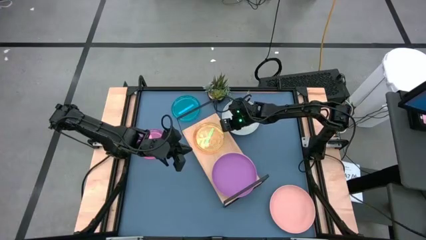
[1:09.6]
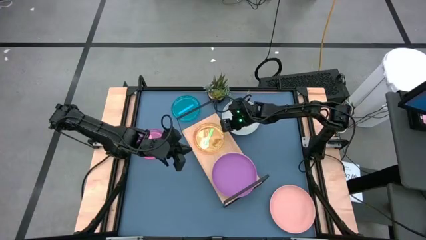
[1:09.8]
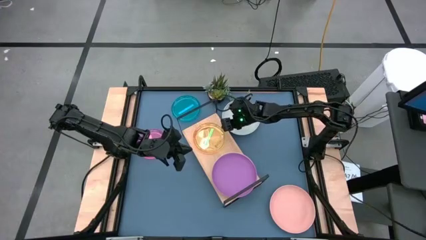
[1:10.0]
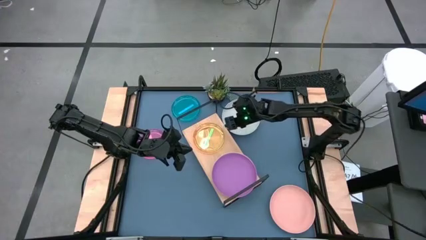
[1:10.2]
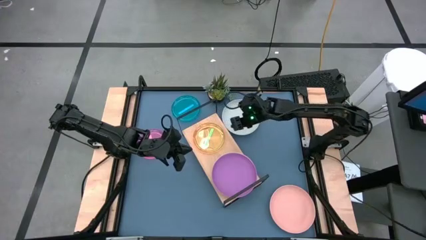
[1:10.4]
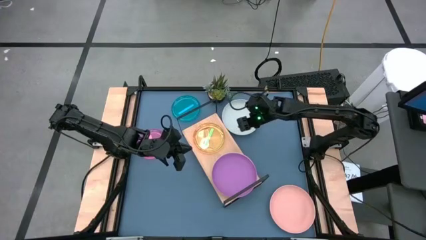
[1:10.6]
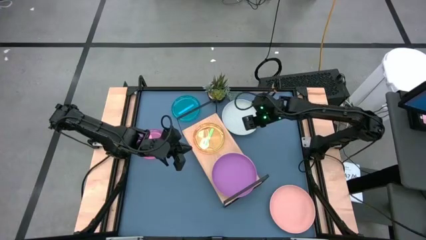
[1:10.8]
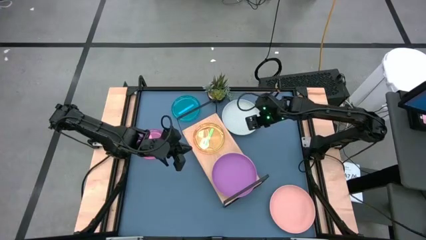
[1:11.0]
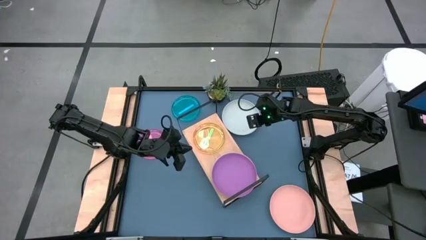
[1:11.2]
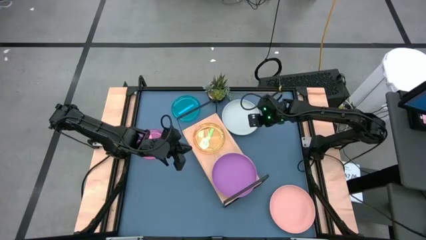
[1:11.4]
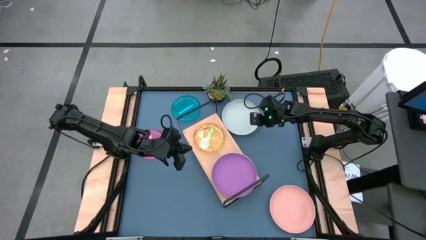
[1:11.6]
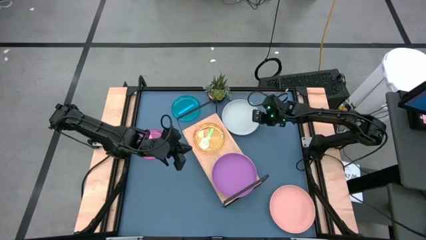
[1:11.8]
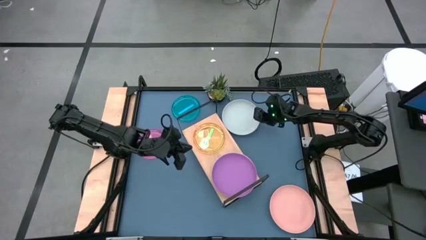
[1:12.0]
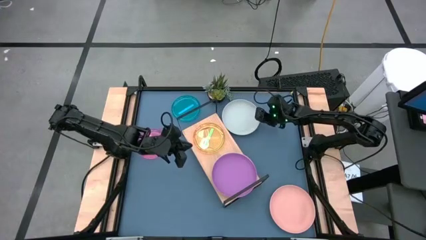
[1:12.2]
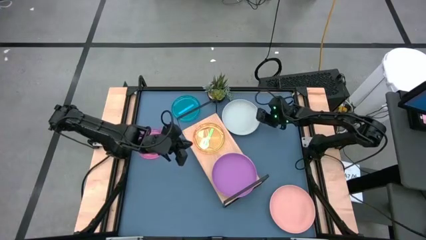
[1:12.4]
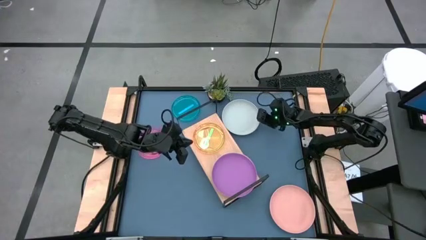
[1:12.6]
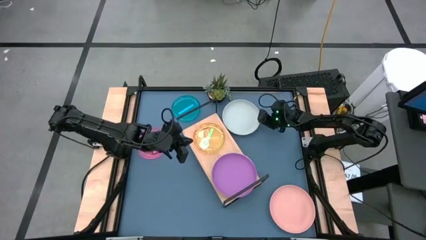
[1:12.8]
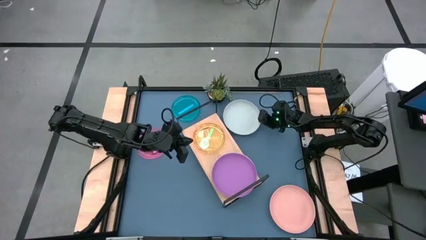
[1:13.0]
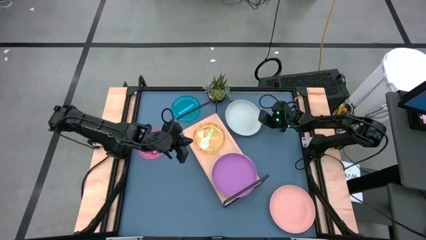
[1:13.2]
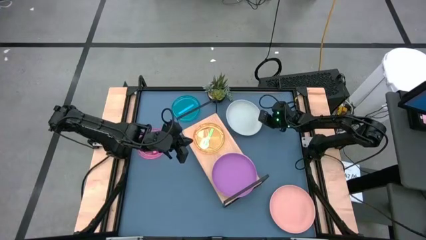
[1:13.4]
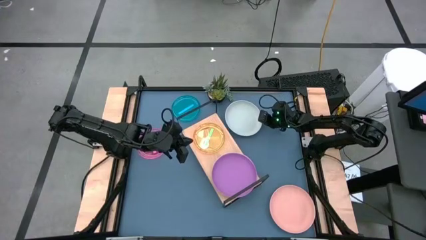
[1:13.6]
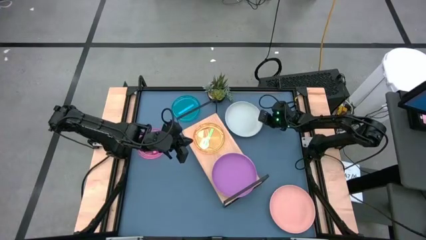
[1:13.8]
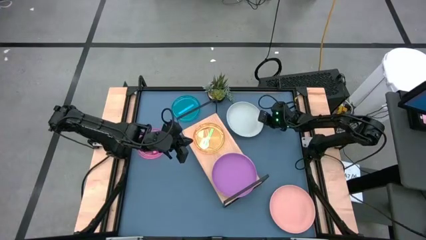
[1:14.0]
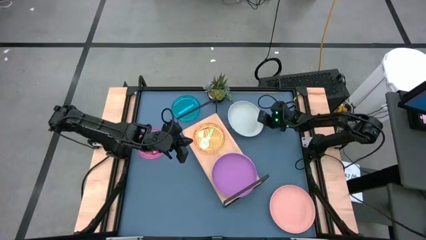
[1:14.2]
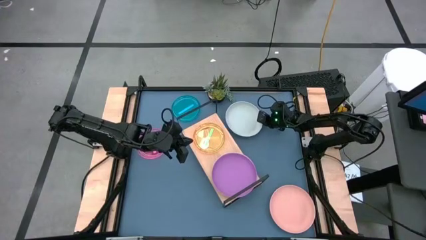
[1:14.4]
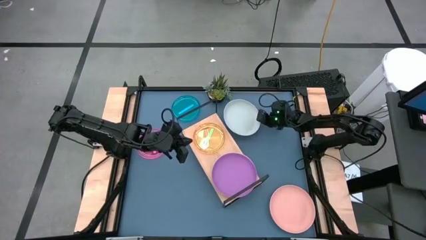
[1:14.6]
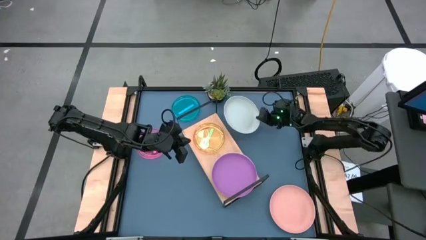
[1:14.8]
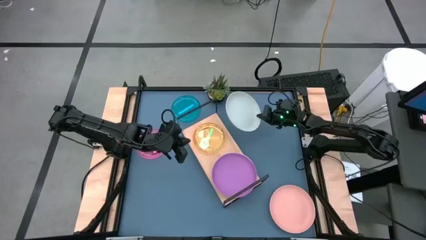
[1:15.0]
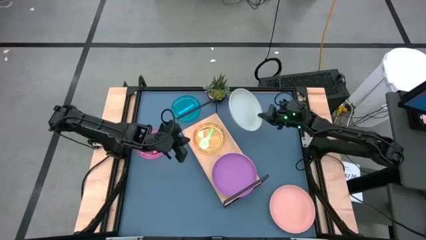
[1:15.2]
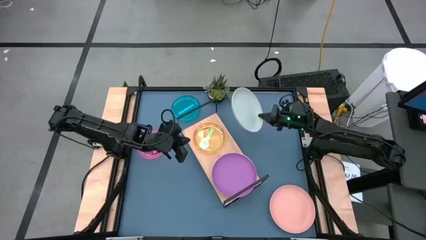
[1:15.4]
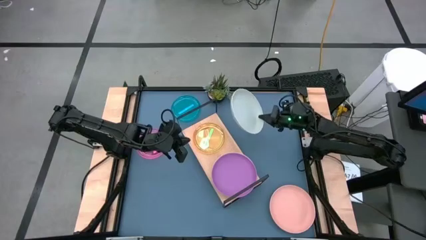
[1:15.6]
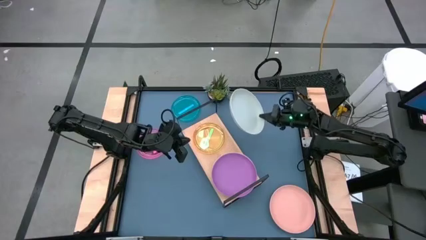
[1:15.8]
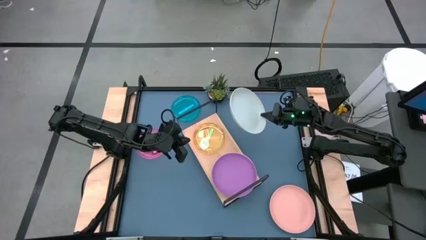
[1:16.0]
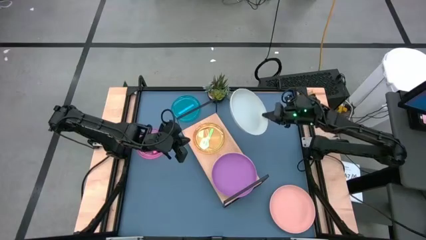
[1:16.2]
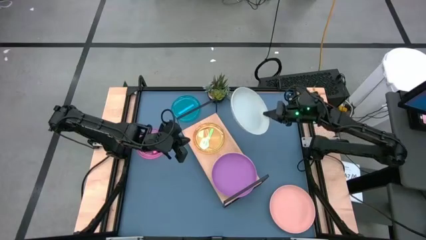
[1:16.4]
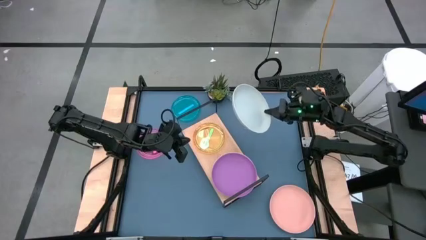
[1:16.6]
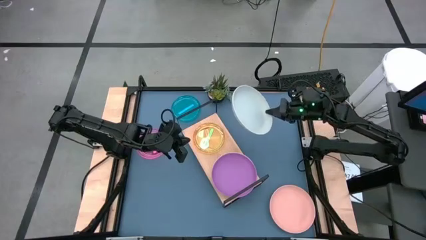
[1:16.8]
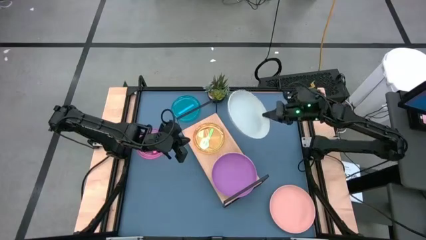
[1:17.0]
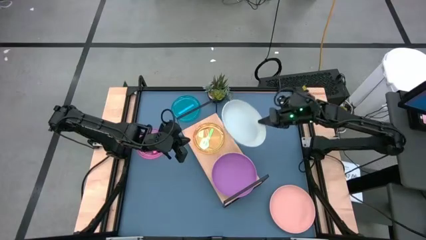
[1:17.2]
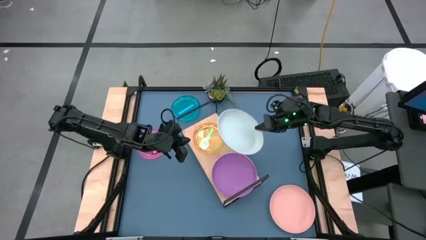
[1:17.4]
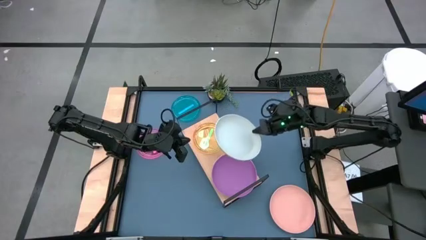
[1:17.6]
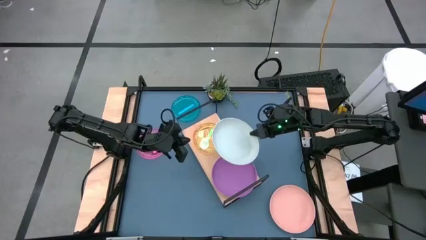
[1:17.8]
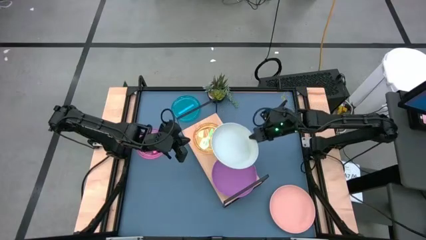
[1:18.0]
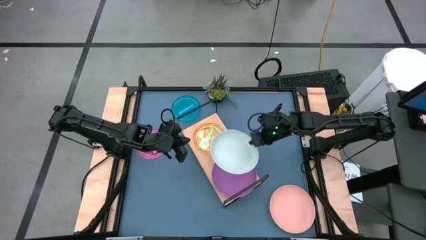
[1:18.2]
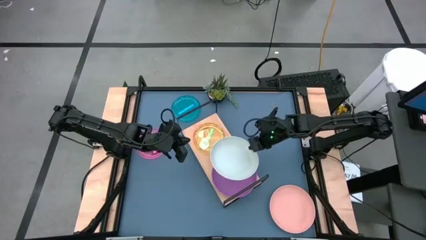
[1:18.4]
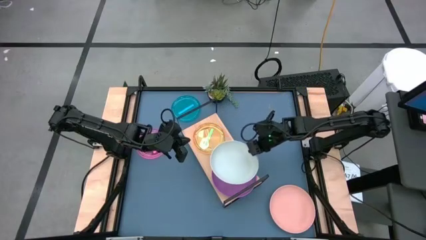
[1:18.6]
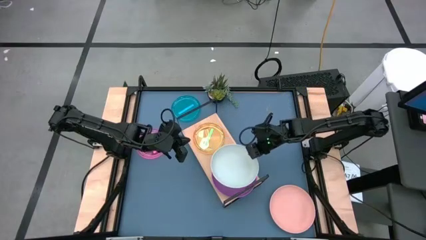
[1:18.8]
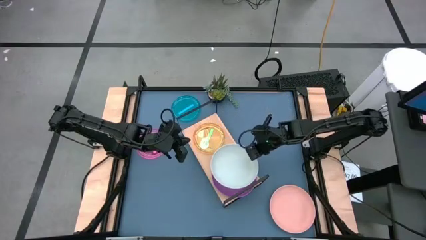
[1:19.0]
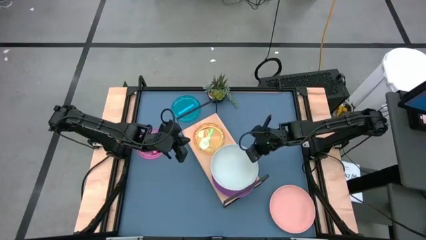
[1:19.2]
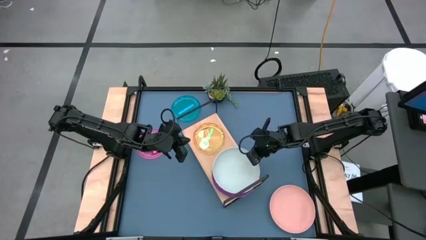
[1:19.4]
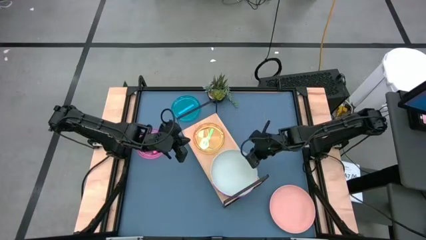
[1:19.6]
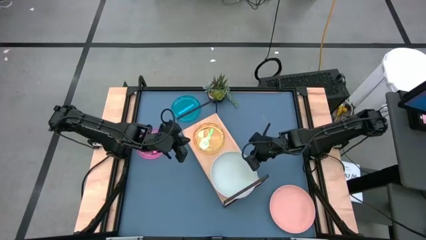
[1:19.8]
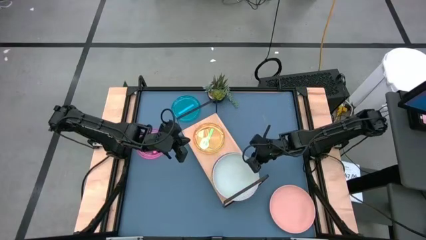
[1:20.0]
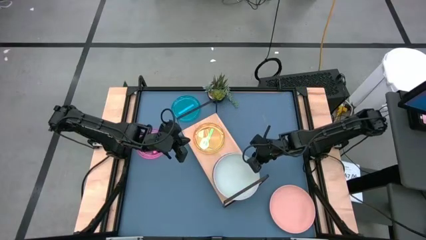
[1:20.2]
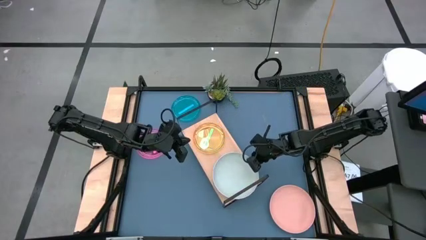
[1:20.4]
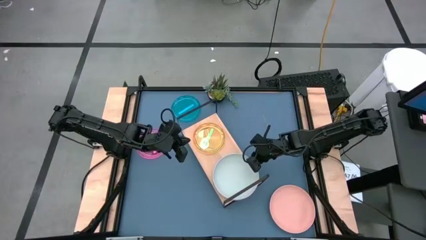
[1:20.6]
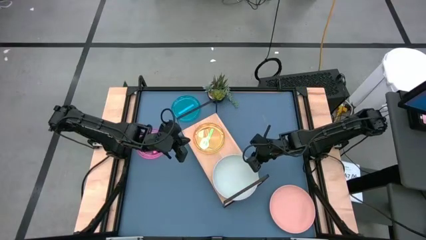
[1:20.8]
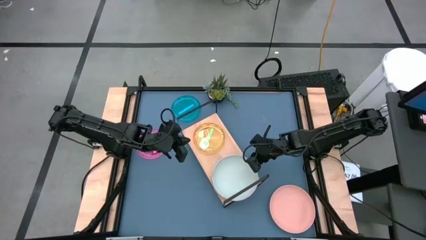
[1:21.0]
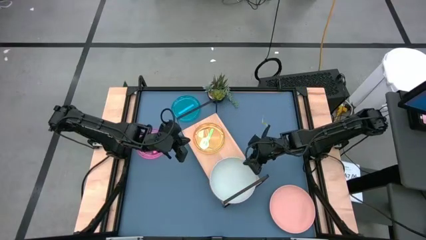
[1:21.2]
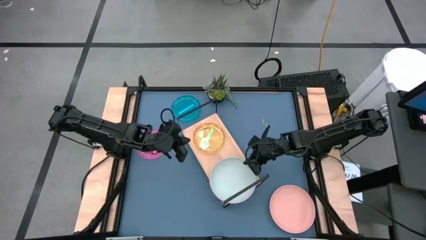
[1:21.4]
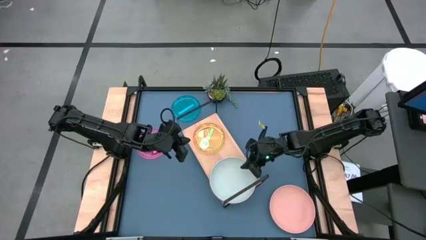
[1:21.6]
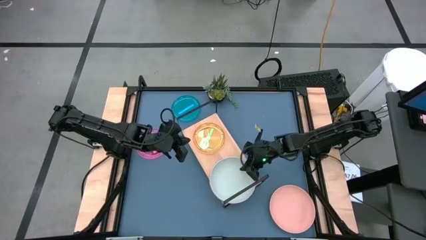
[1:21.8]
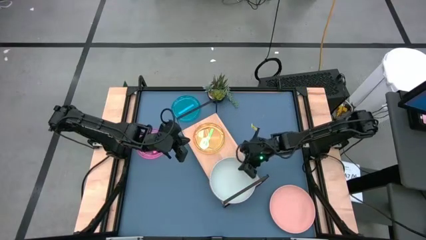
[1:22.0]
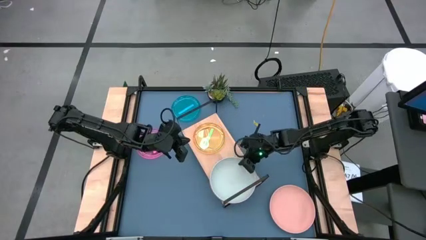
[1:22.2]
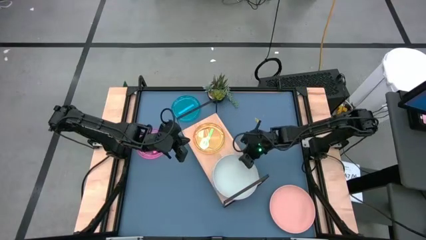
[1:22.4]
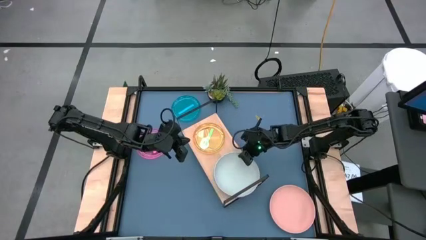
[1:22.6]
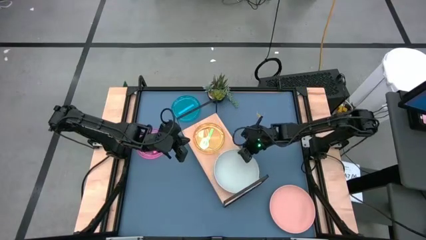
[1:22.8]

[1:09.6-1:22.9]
Task: Place and stack plates onto a shelf
Stack the large light gray plate on the large violet plate on the shelf

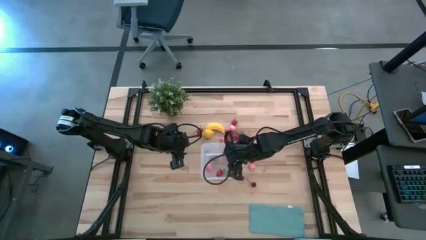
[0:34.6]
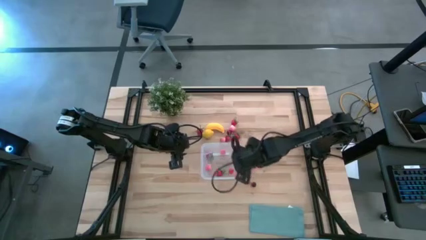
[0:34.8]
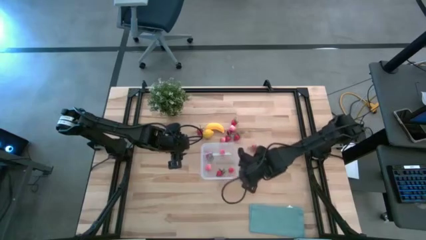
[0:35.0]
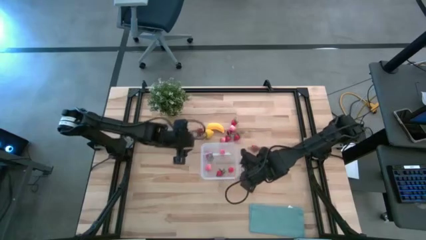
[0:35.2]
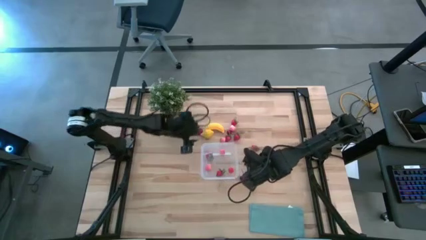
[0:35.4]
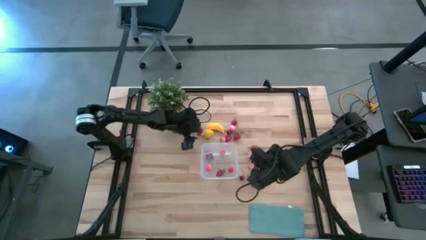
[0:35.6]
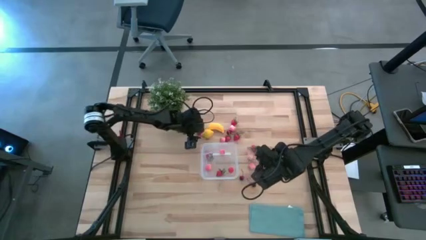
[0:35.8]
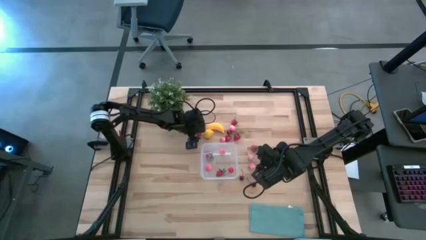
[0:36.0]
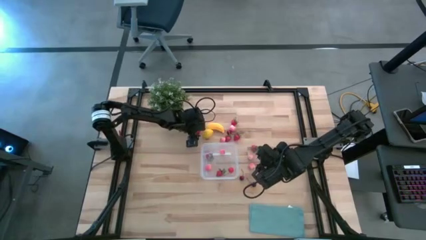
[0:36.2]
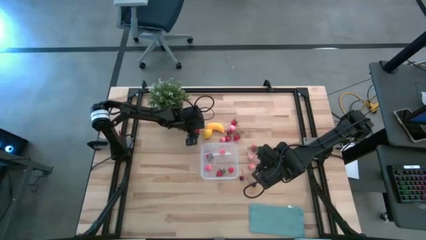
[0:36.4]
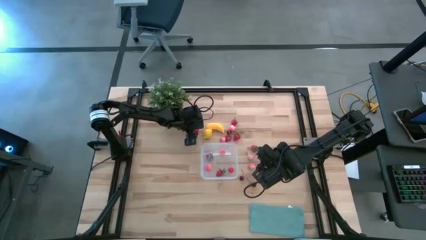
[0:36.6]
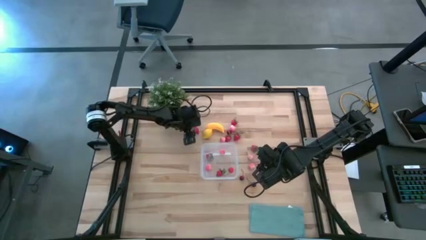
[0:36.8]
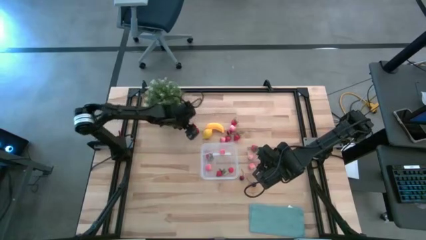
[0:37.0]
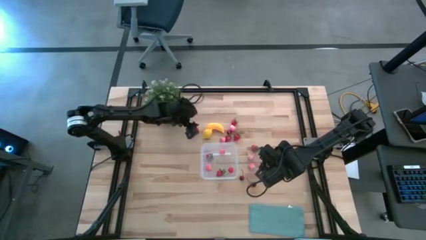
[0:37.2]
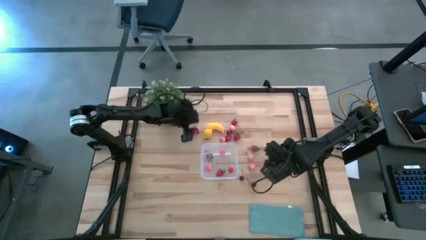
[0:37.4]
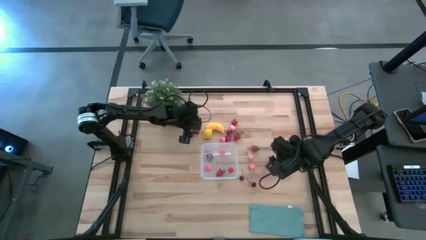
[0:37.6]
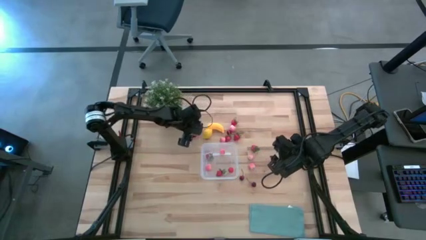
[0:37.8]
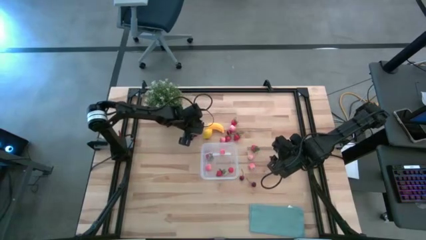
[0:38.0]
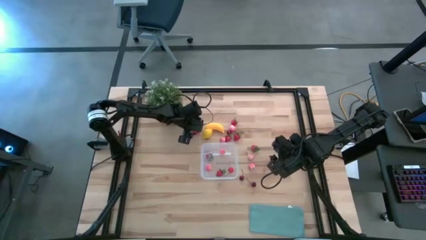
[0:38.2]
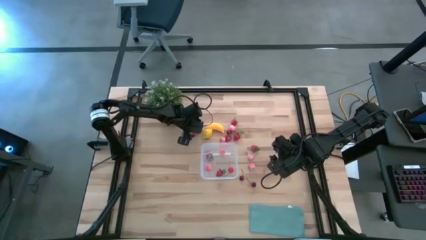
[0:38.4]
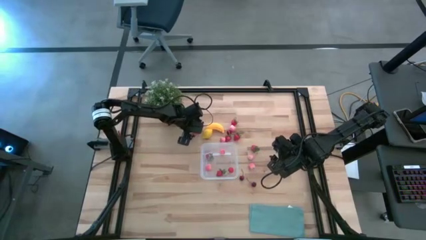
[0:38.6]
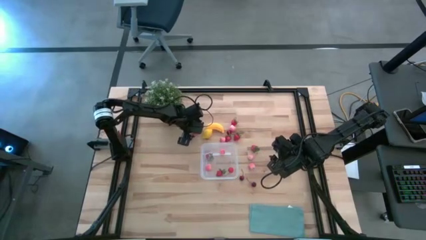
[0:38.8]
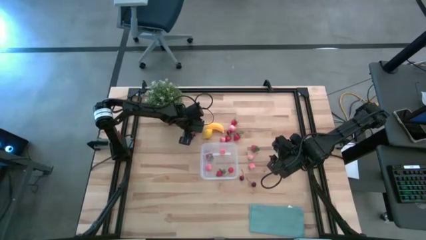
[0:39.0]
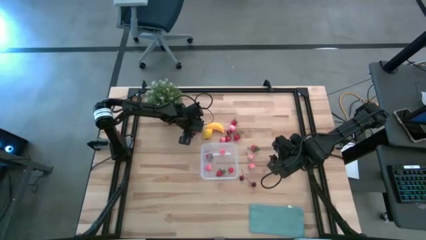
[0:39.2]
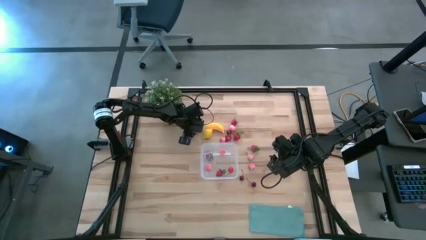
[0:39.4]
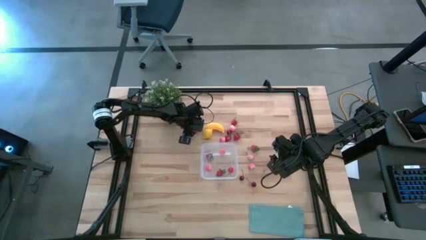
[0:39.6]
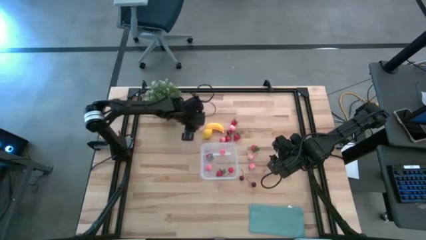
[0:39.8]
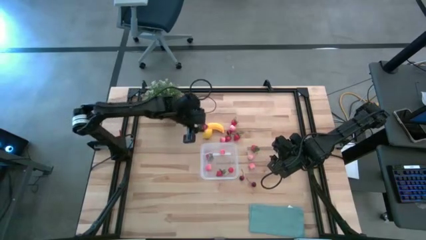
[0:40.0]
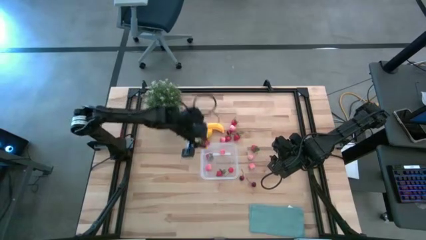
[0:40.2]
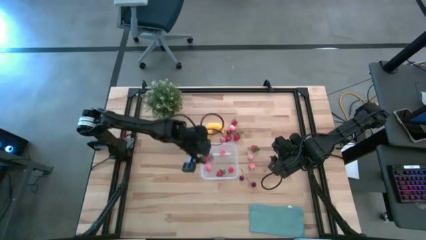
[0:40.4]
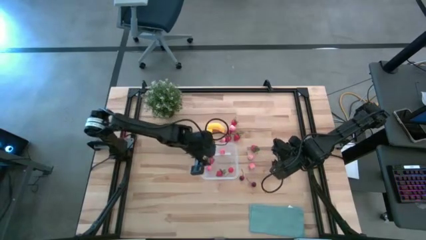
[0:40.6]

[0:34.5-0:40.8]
Task: Pick and placing Produce into tupperware
Put the red strawberry into the transparent container
